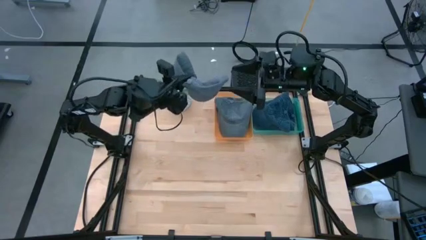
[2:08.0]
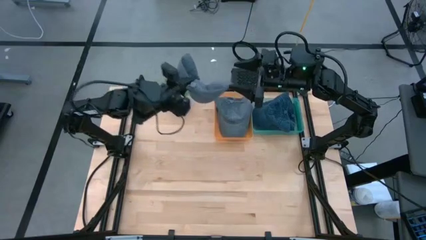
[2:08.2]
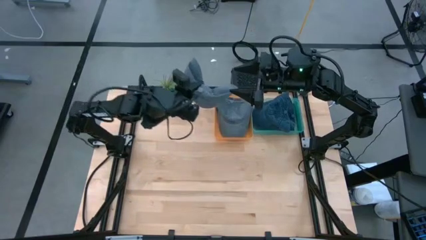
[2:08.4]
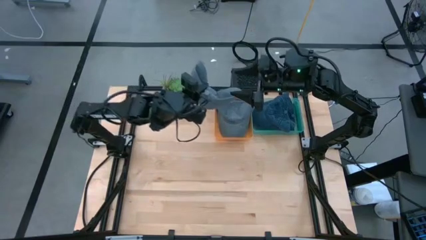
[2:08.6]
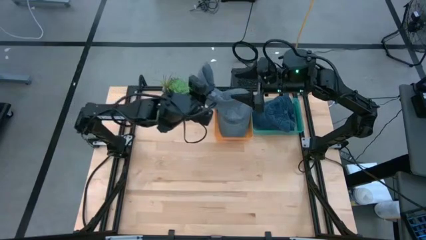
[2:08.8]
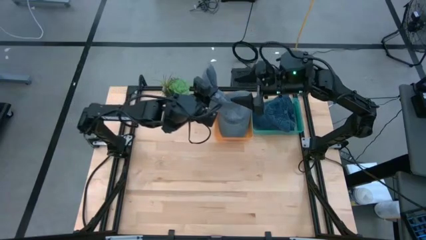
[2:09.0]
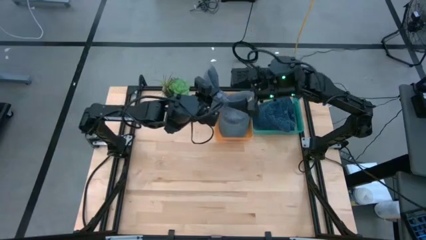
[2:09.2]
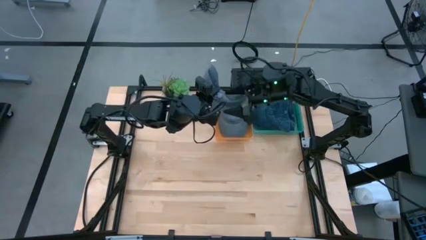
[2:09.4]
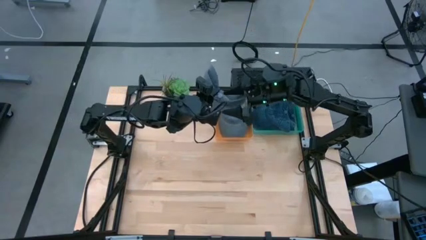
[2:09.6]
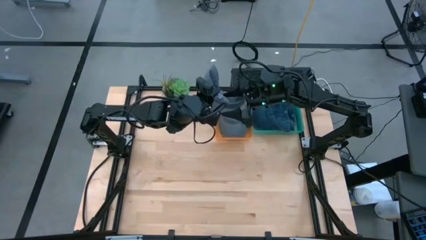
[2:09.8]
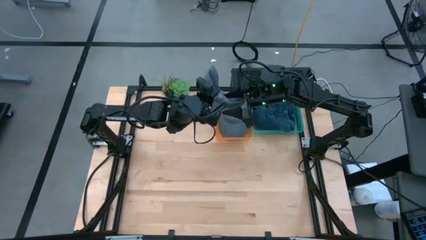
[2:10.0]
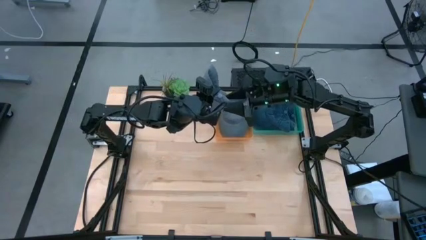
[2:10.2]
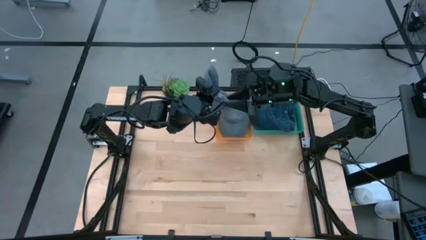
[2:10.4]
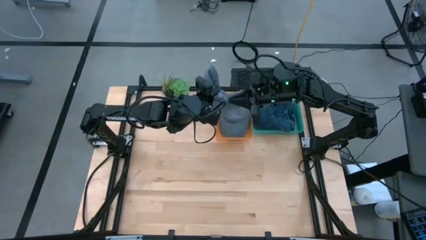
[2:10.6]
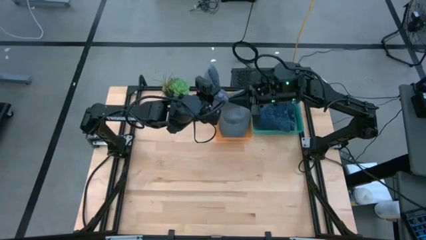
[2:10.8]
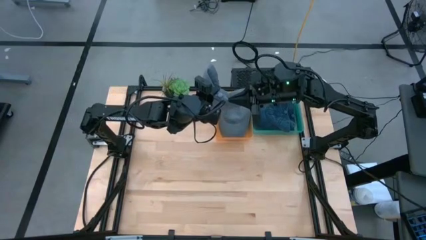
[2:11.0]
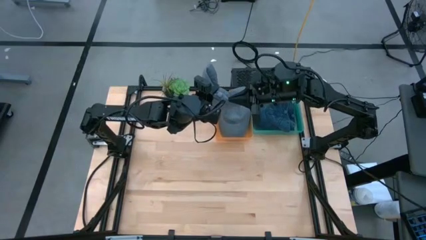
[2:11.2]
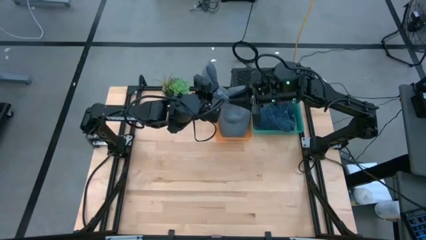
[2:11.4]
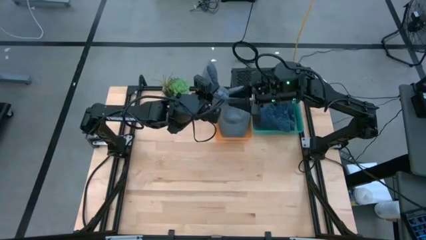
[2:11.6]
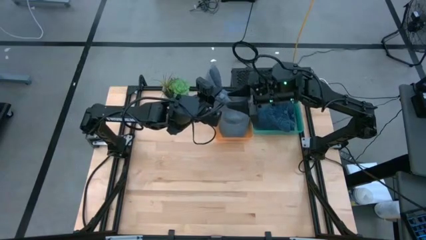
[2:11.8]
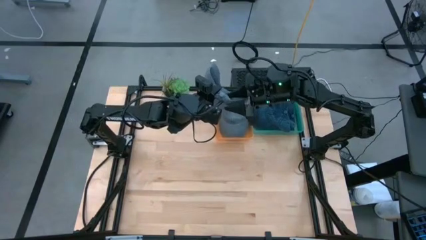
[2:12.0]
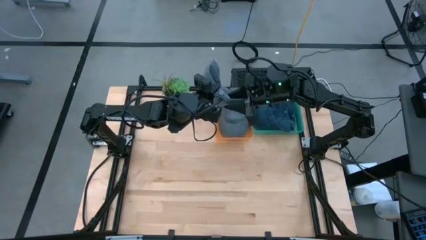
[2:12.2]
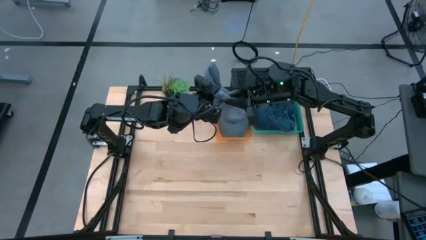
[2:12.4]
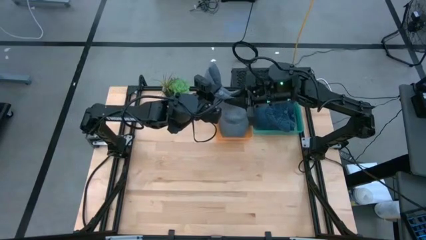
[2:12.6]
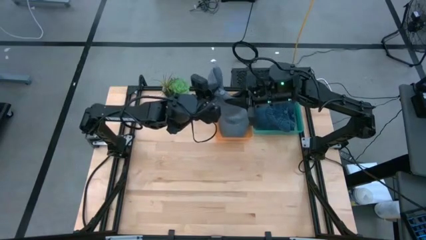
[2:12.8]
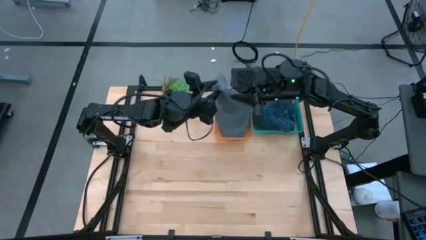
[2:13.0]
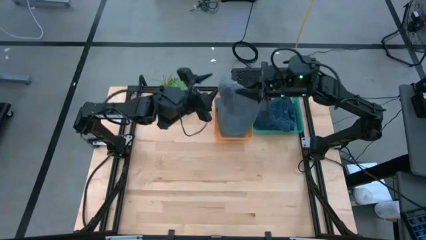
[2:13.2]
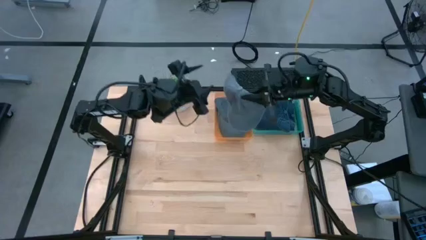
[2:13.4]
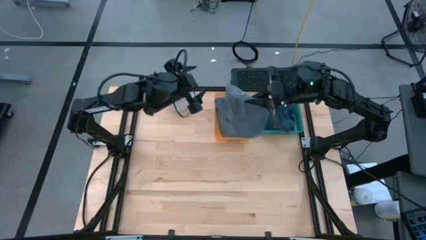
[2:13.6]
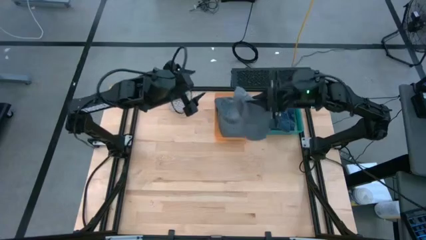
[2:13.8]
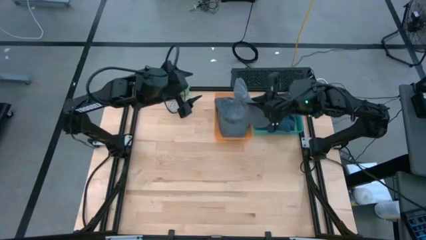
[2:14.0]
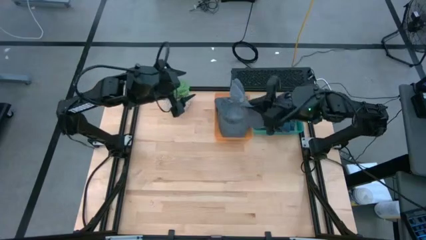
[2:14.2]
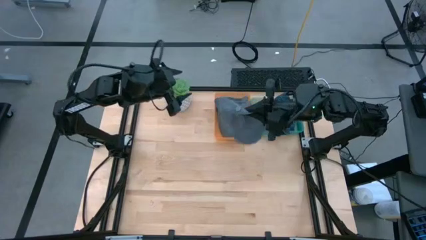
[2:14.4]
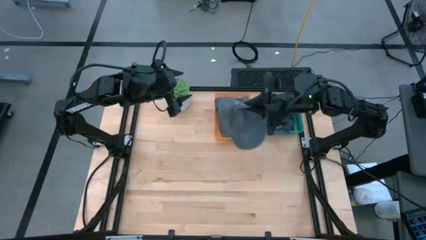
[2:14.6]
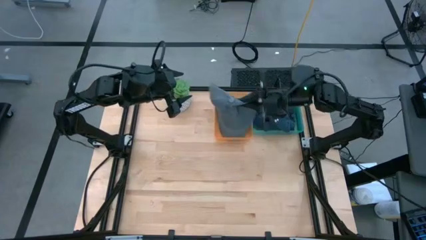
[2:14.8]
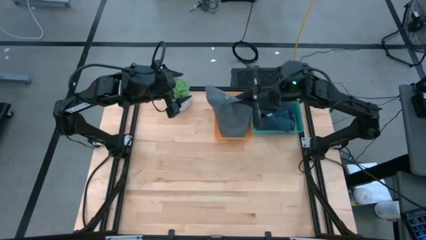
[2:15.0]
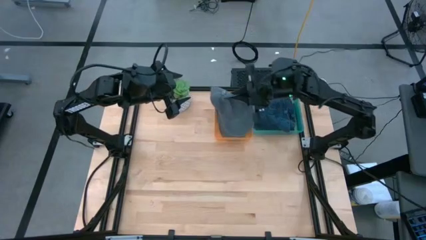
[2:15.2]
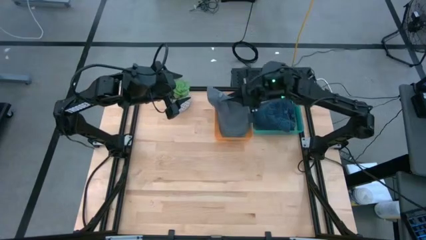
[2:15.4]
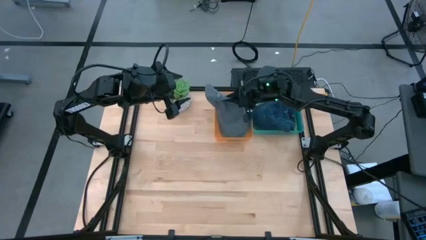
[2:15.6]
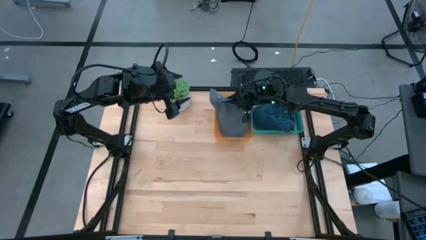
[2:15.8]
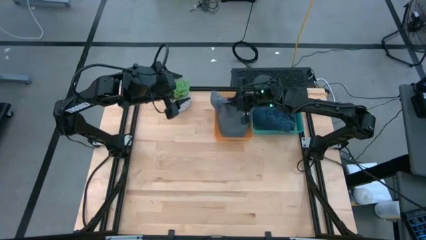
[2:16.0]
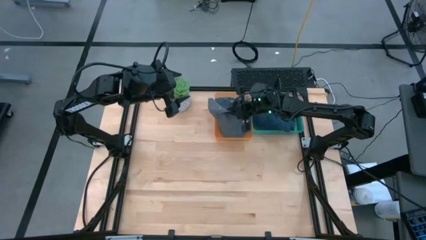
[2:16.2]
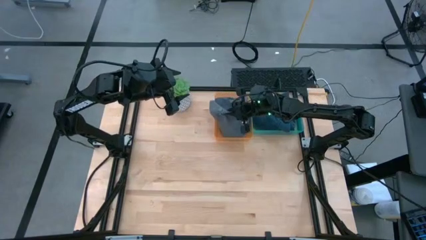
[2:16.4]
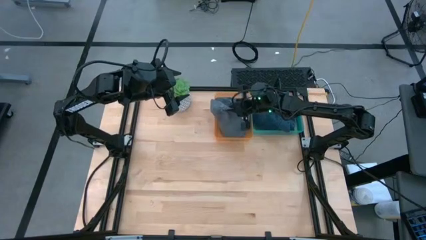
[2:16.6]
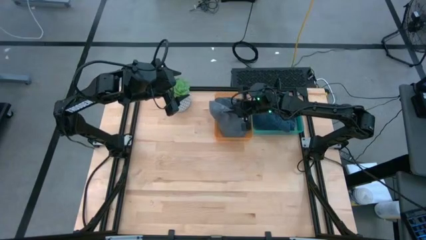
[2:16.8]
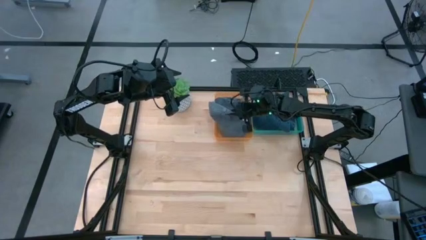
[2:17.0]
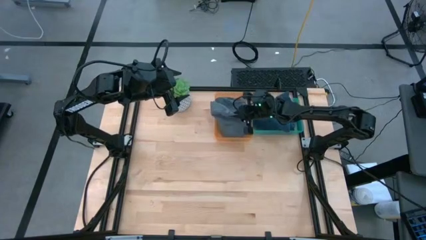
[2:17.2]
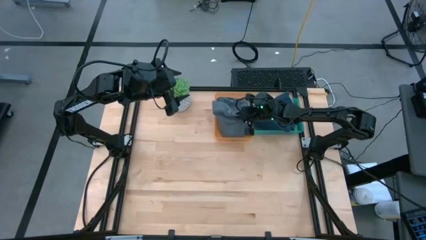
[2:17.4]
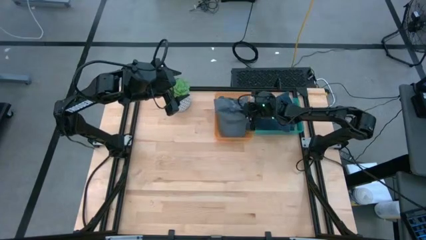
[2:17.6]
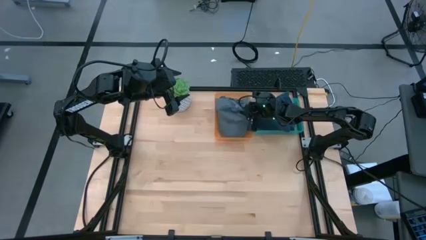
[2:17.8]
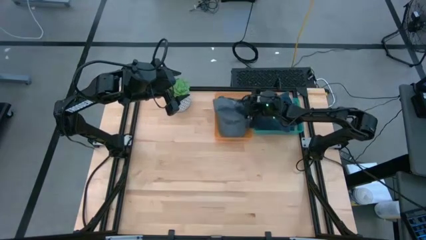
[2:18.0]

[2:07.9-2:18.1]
Task: Pick & Place hat
Put the gray cap in the orange bin

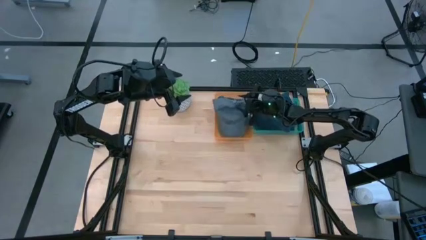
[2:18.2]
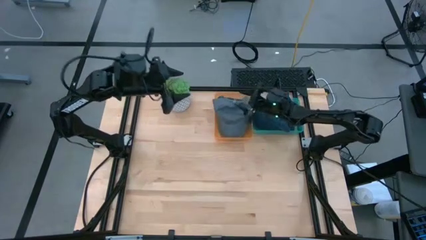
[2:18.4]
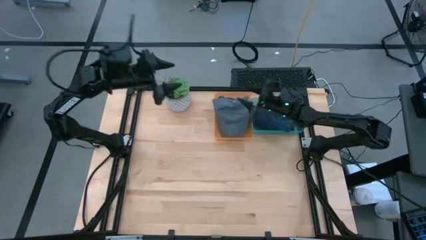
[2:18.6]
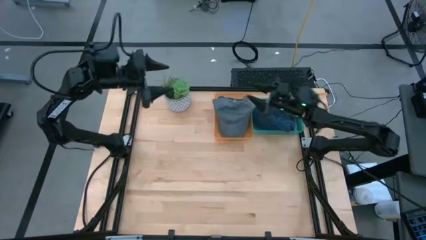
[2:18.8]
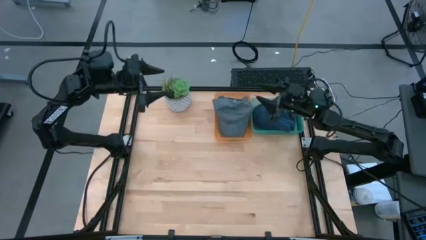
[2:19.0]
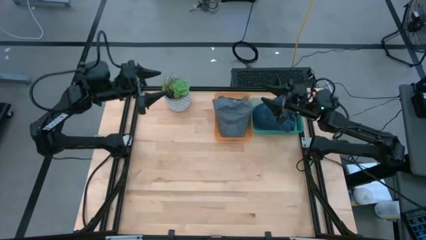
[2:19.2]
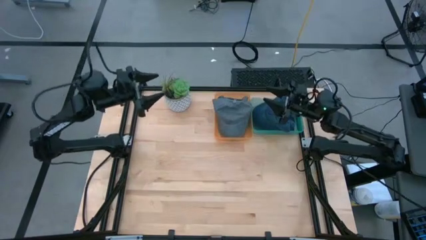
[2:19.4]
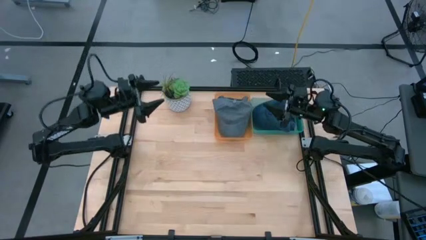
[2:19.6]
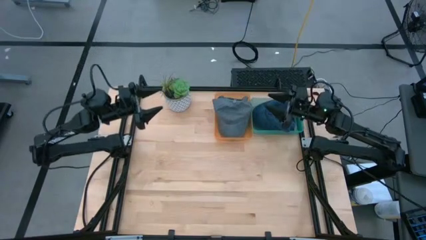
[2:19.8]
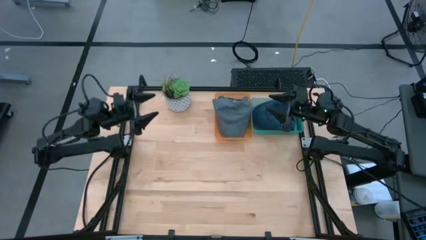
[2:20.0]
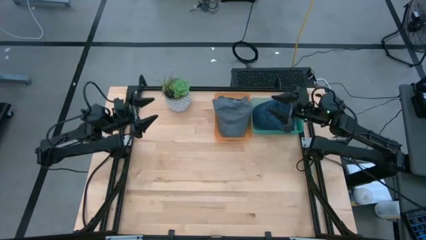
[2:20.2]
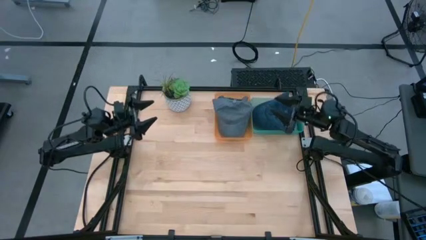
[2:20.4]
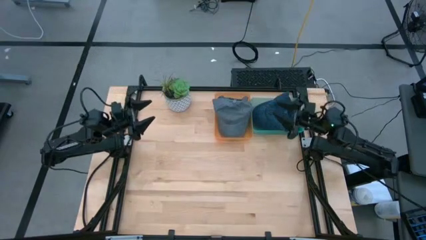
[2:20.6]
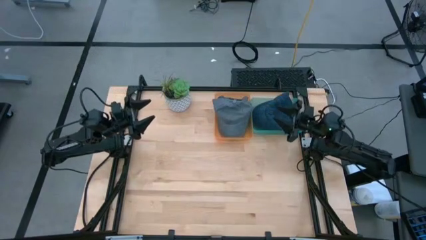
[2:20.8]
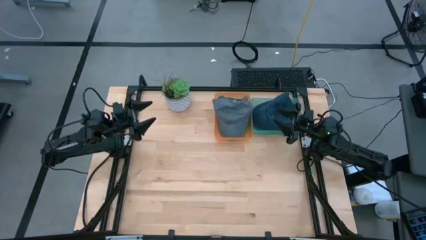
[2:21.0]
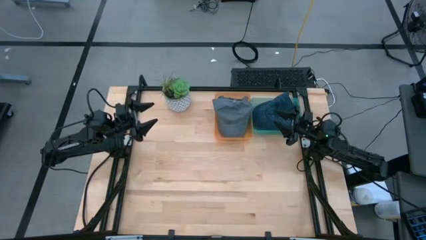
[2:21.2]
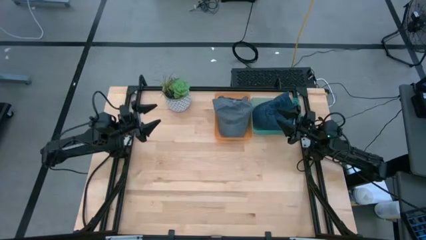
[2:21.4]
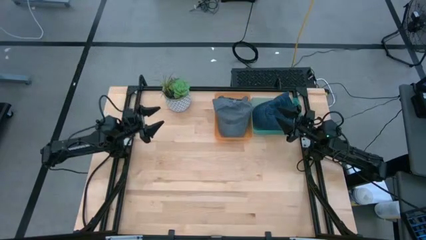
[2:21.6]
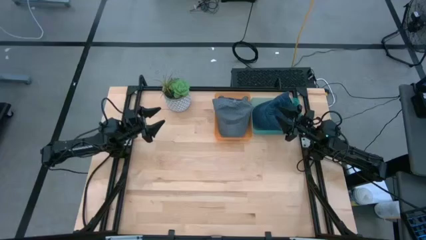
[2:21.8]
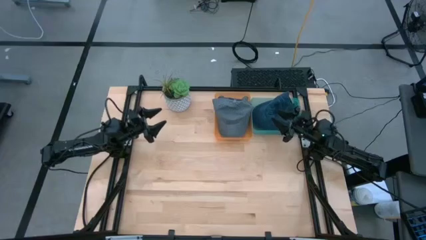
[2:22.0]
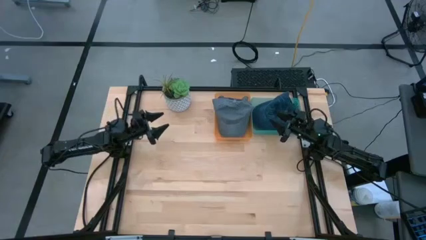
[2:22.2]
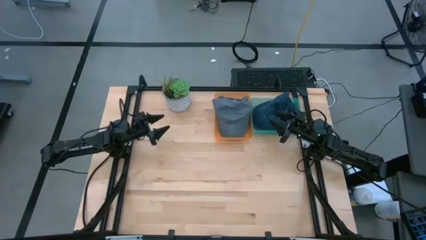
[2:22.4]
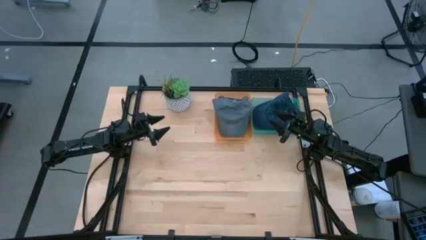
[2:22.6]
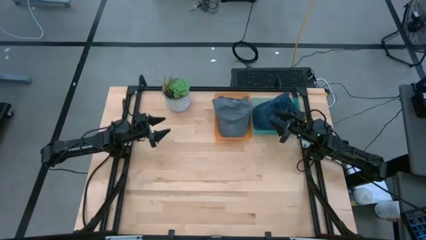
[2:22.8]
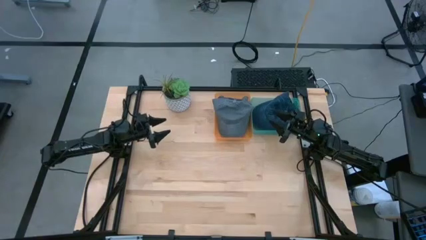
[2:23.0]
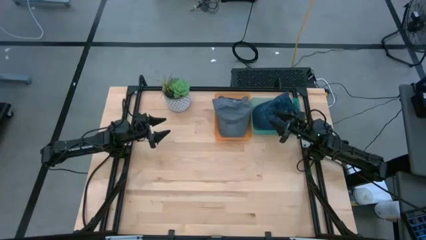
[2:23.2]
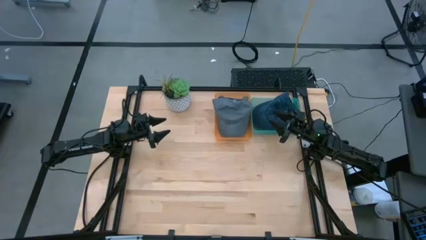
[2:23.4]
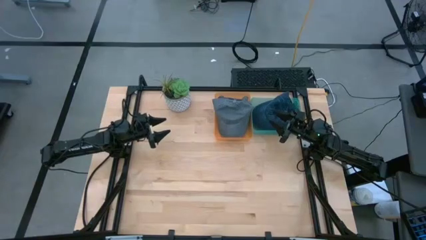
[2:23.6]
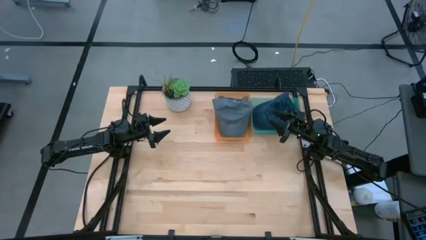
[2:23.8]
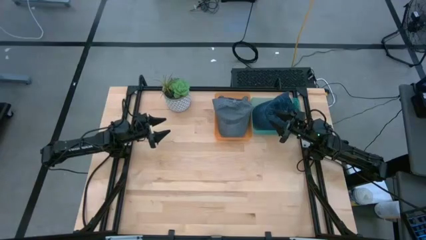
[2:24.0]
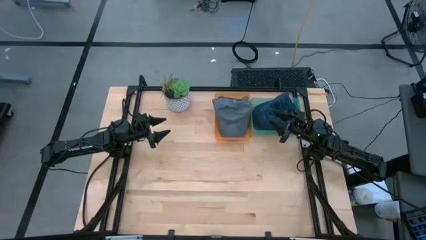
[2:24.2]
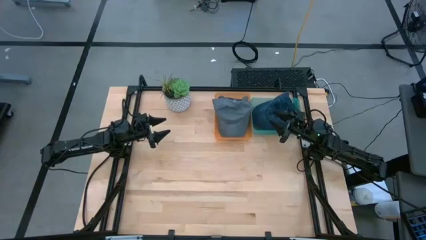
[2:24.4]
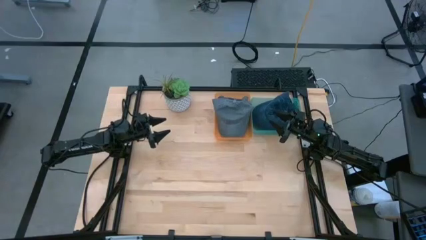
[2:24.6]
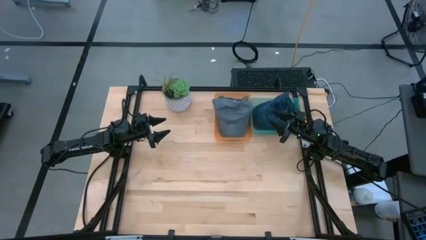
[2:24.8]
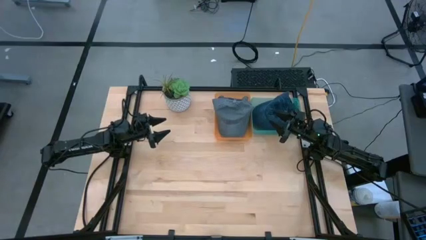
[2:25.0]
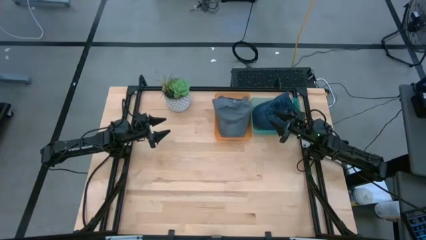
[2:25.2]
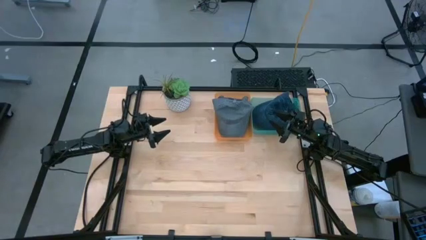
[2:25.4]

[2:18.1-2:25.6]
Return to Home Position
